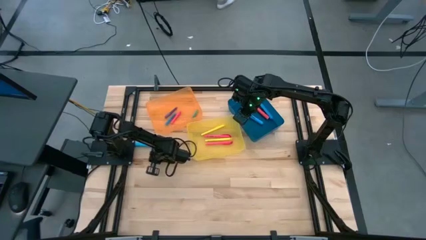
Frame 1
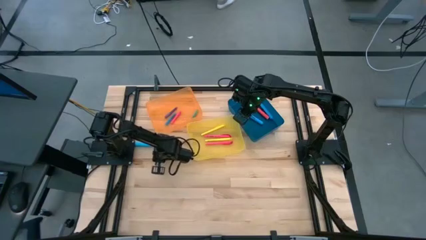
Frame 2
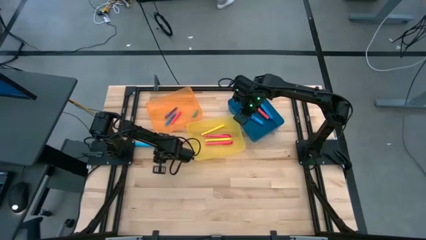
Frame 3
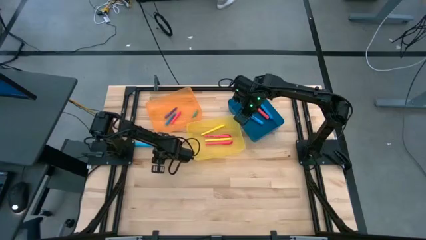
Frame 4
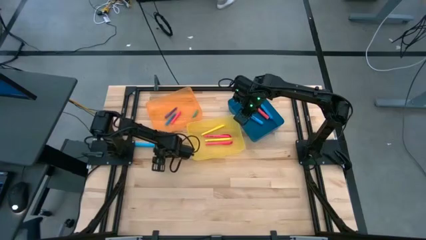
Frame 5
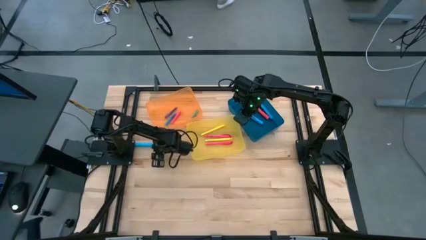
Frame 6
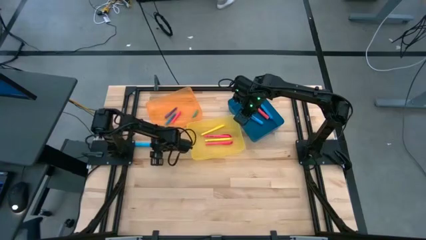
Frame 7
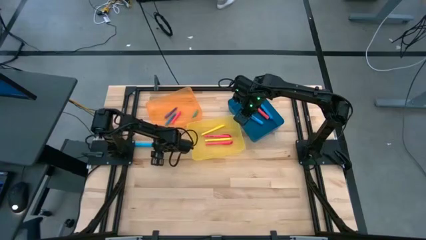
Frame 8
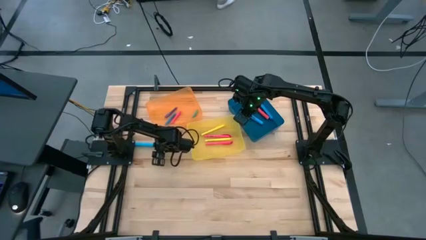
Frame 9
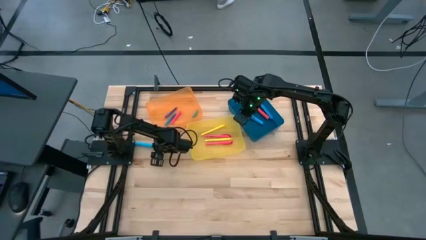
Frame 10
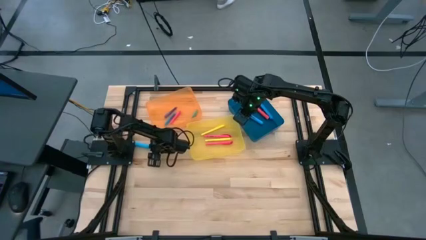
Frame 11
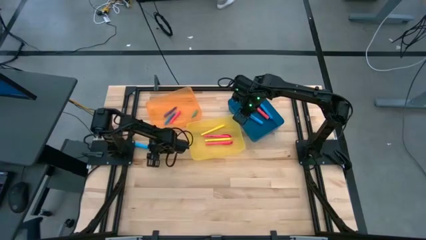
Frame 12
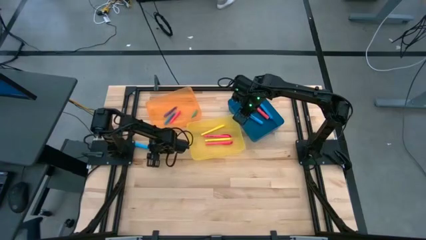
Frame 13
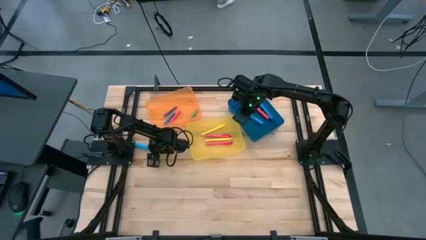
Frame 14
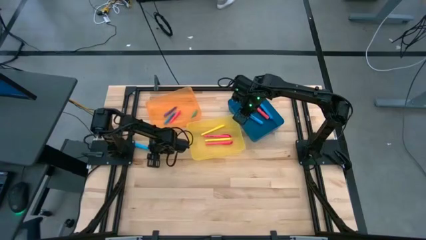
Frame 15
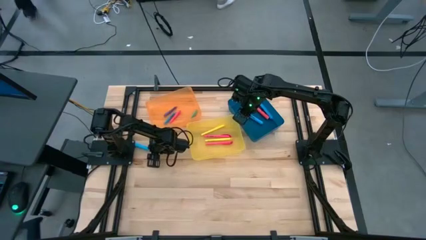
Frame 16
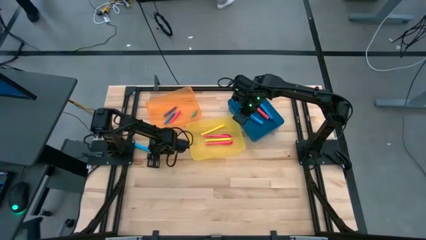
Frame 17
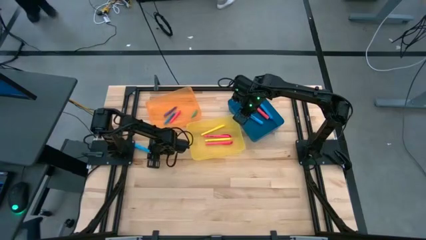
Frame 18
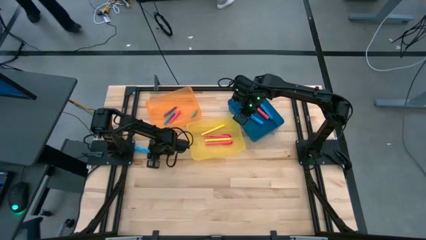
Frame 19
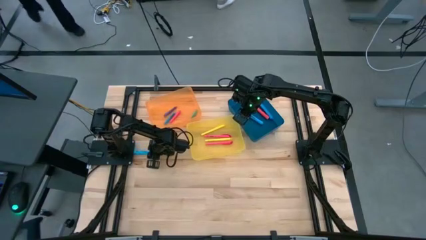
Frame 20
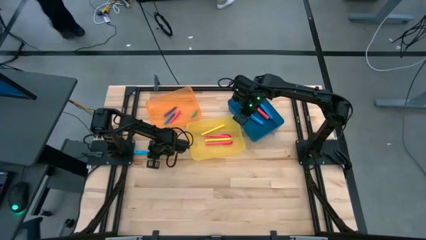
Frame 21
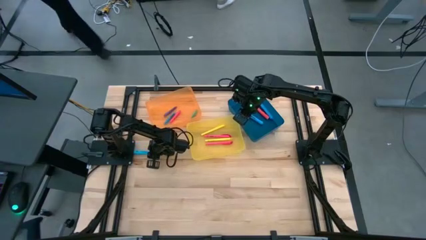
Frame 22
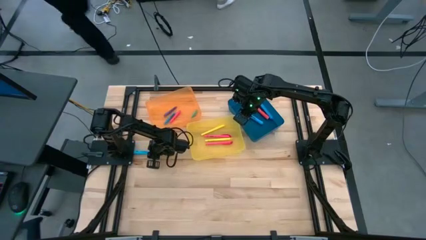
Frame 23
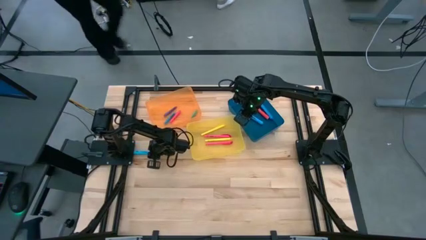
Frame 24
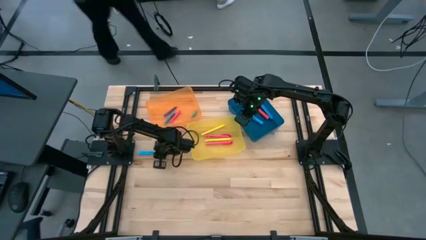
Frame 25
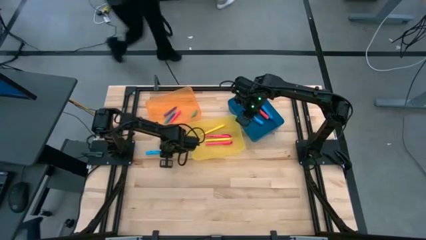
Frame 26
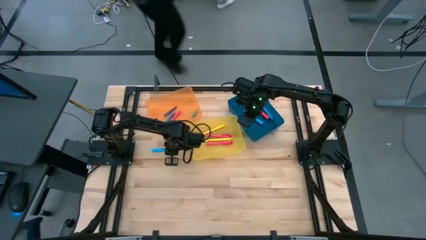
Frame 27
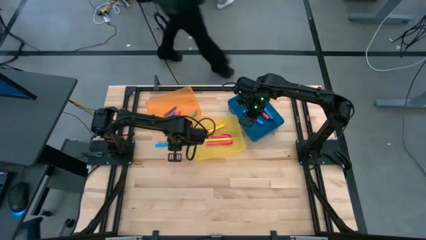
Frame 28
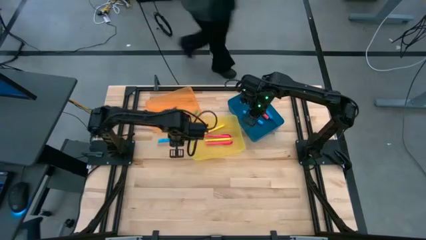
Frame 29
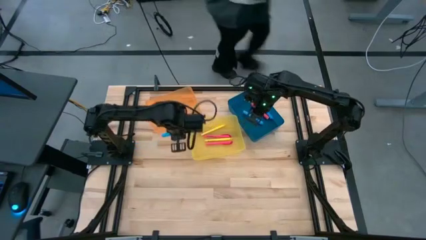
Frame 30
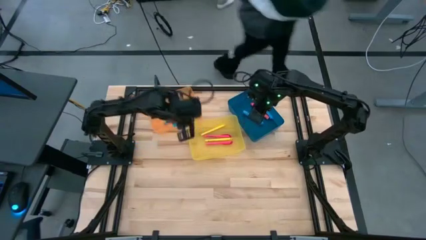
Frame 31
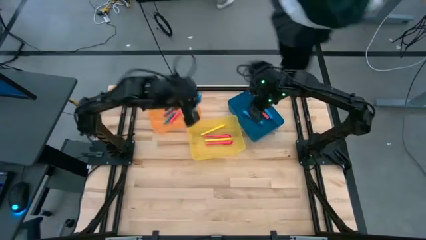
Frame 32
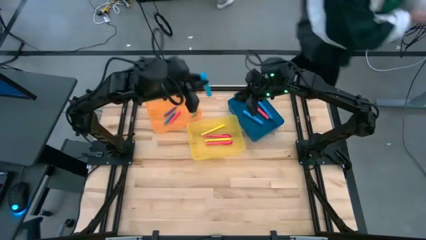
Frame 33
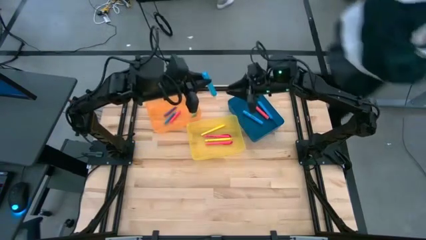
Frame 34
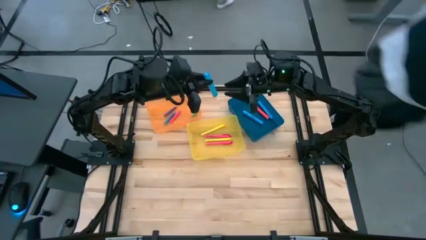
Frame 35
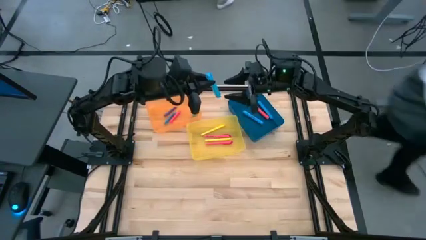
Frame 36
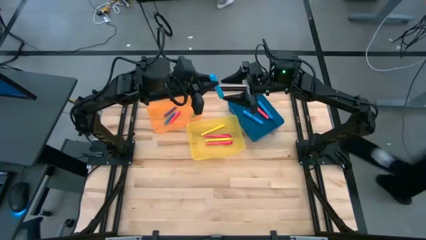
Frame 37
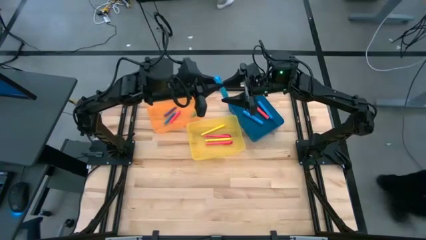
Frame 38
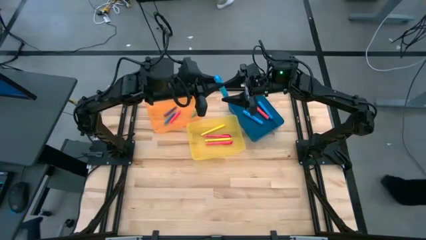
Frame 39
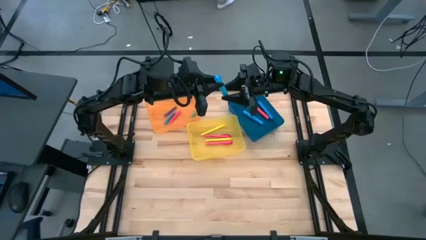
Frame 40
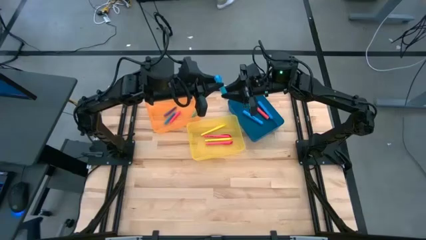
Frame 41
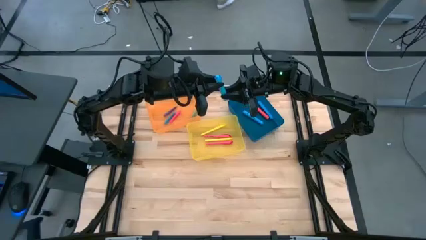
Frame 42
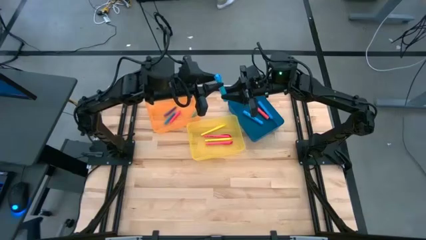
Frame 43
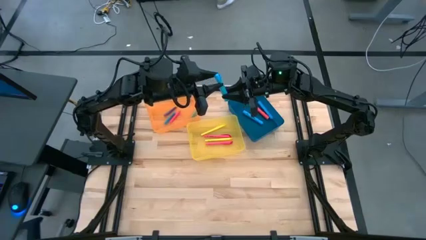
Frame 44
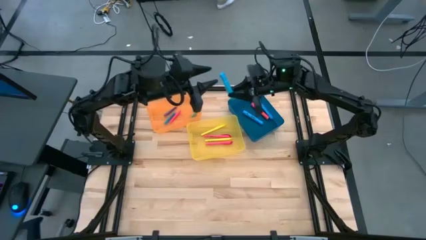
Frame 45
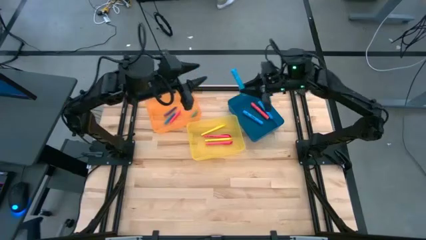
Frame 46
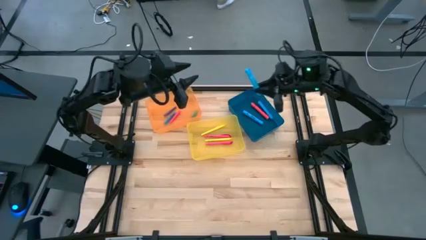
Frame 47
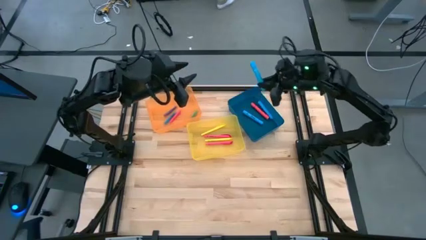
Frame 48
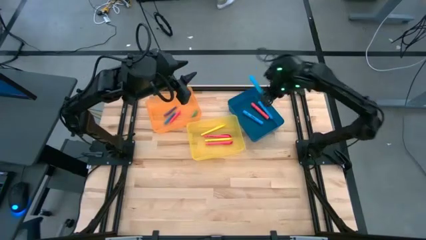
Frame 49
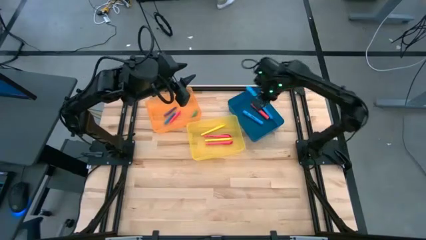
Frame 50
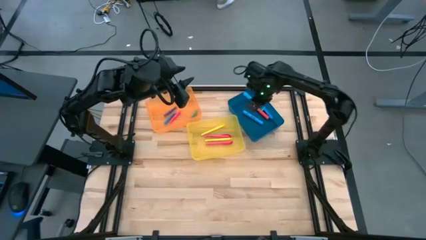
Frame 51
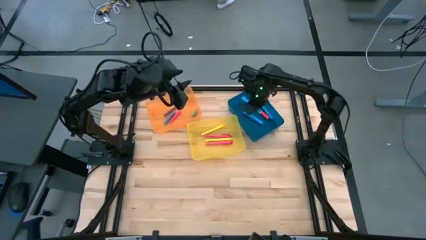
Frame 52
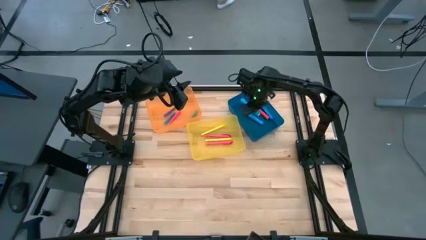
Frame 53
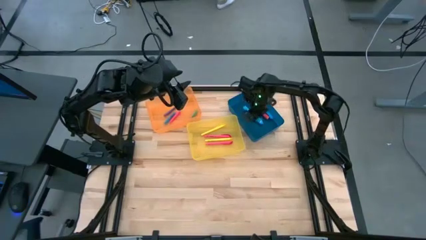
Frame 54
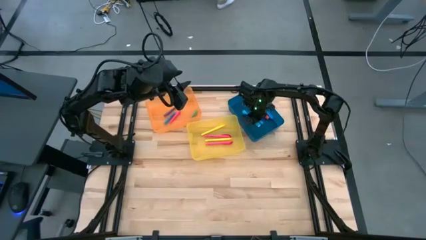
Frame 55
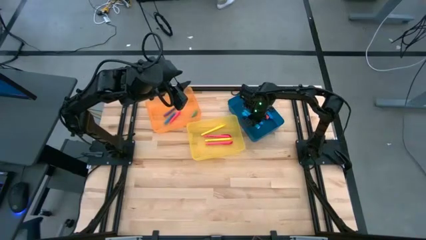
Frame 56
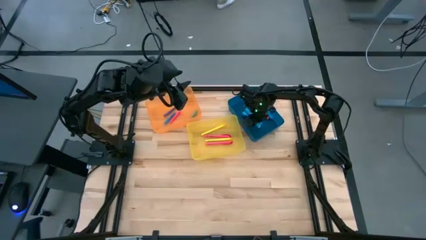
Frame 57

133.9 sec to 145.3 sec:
Task: Pick & Place Markers
Put the blue large highlighter into the blue bin
